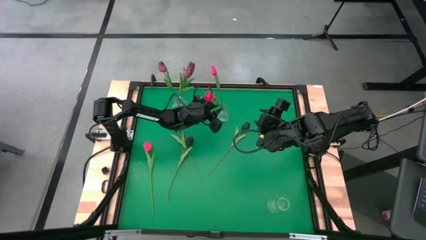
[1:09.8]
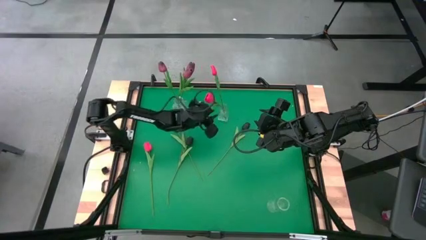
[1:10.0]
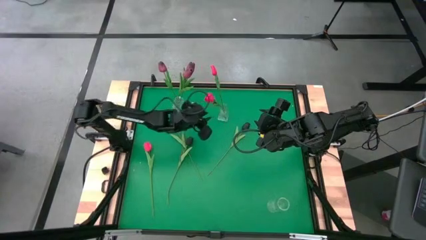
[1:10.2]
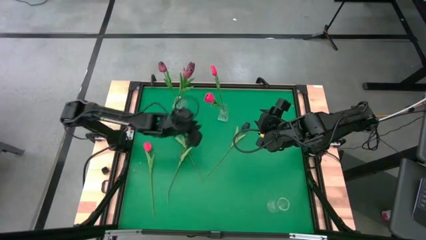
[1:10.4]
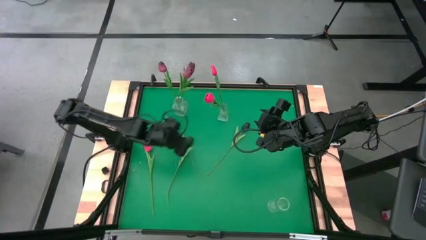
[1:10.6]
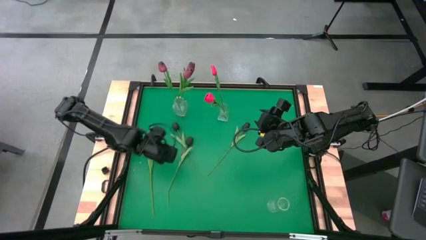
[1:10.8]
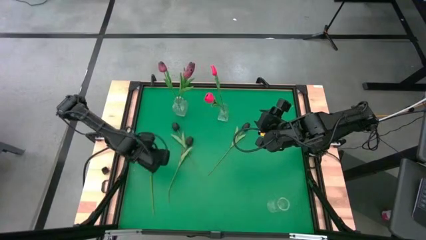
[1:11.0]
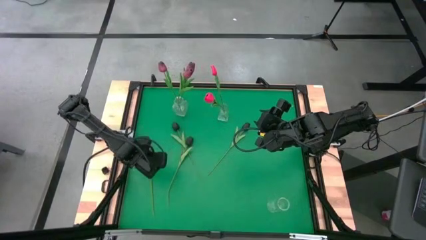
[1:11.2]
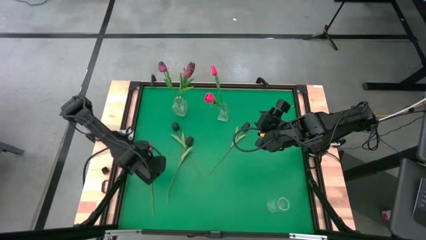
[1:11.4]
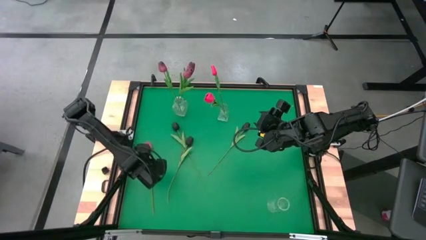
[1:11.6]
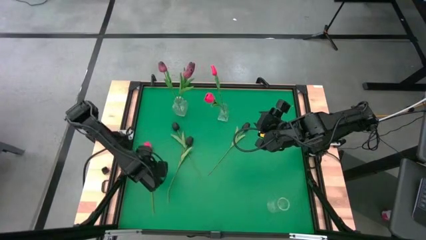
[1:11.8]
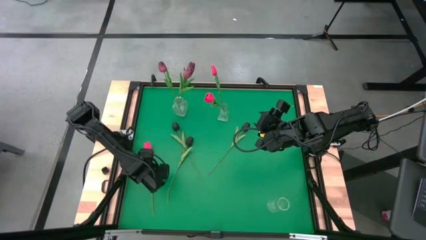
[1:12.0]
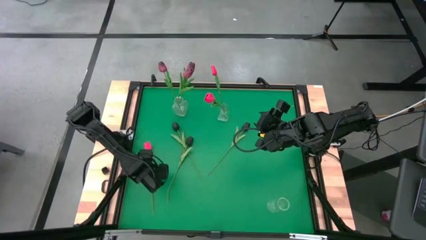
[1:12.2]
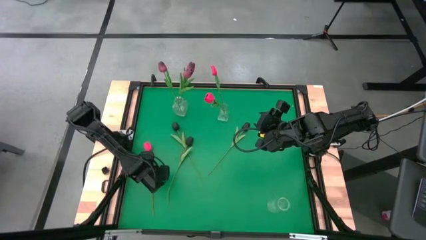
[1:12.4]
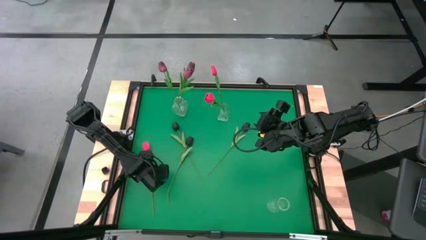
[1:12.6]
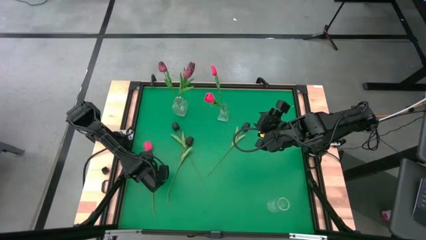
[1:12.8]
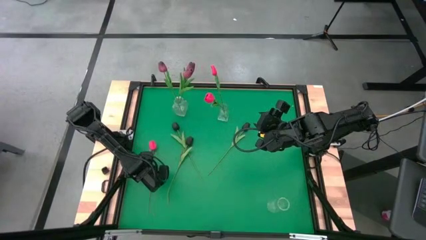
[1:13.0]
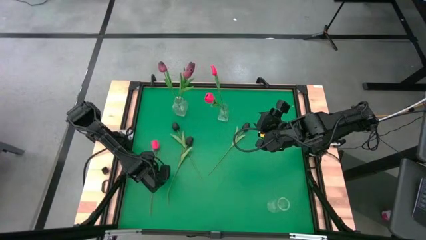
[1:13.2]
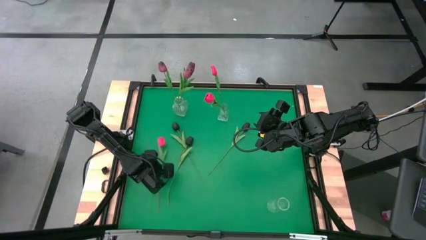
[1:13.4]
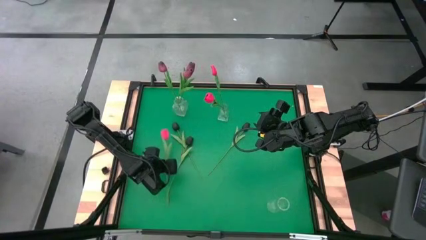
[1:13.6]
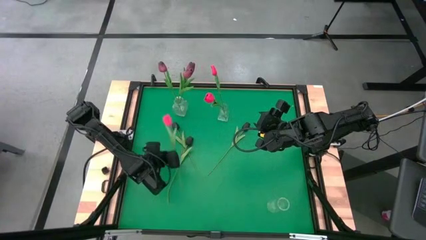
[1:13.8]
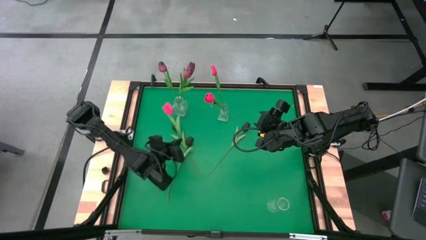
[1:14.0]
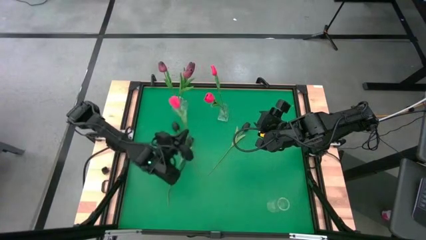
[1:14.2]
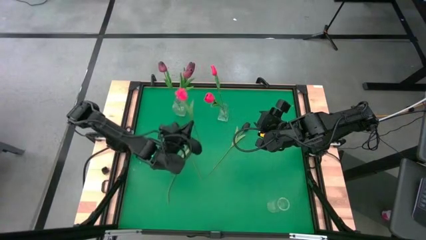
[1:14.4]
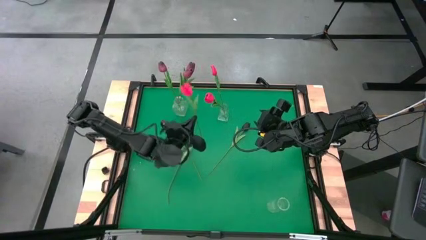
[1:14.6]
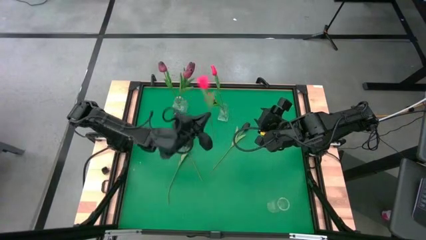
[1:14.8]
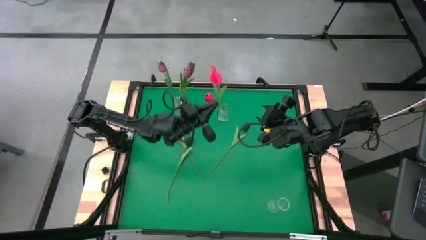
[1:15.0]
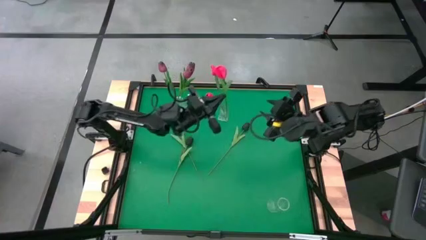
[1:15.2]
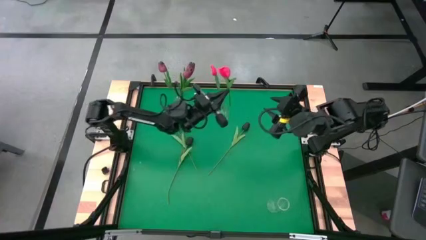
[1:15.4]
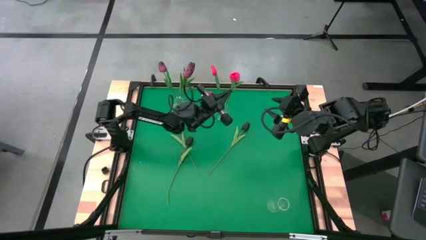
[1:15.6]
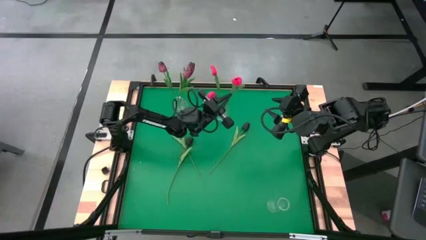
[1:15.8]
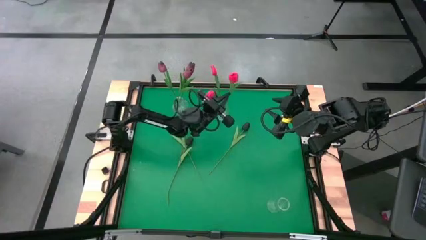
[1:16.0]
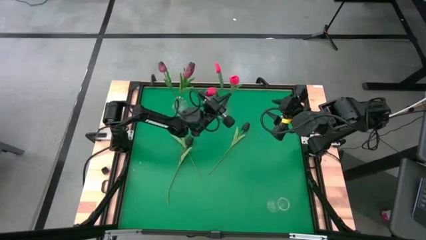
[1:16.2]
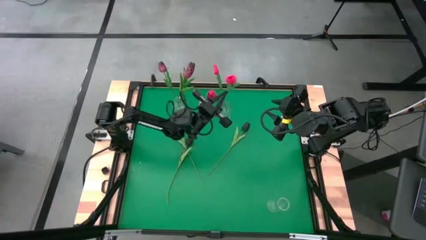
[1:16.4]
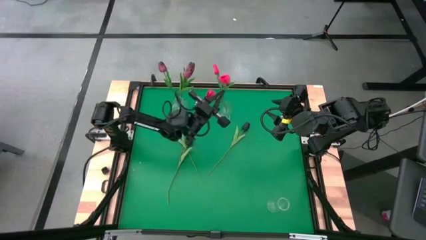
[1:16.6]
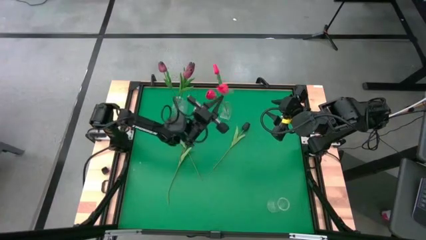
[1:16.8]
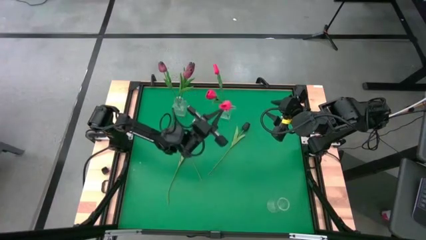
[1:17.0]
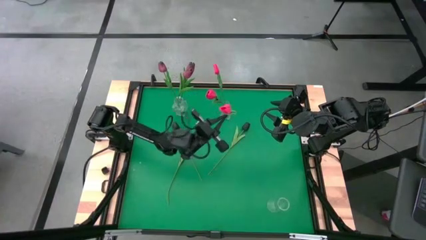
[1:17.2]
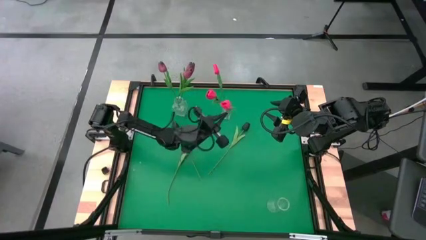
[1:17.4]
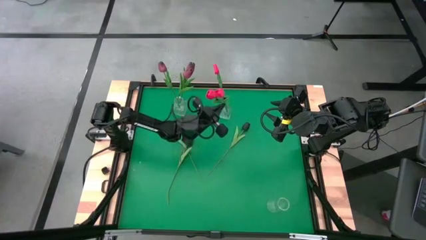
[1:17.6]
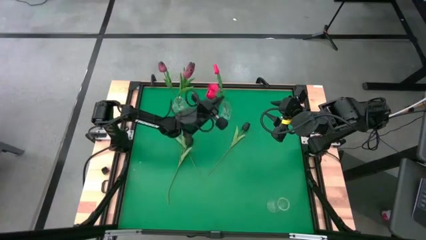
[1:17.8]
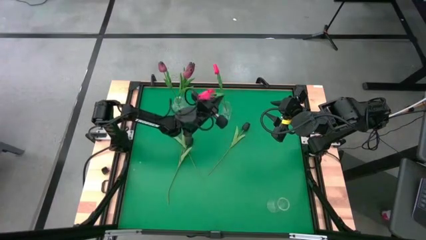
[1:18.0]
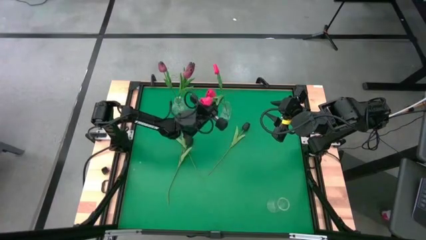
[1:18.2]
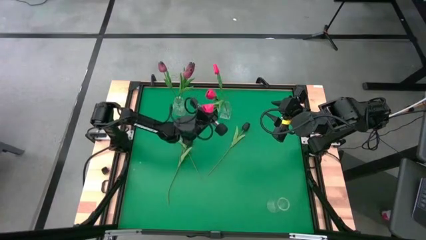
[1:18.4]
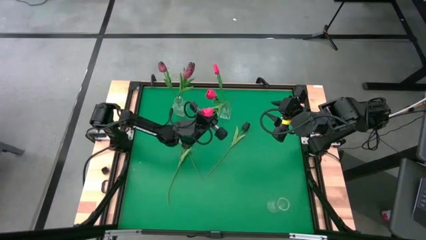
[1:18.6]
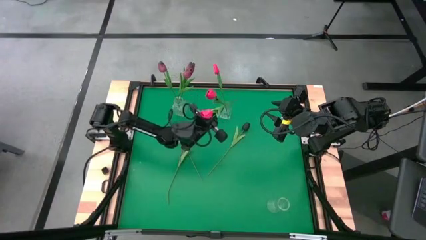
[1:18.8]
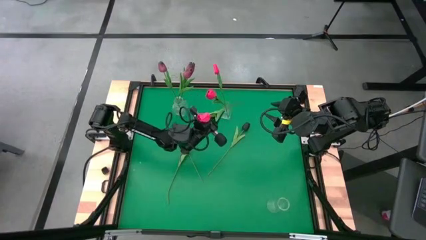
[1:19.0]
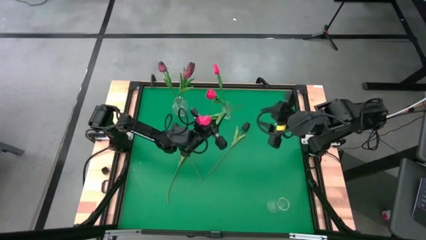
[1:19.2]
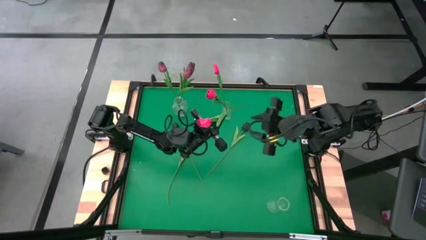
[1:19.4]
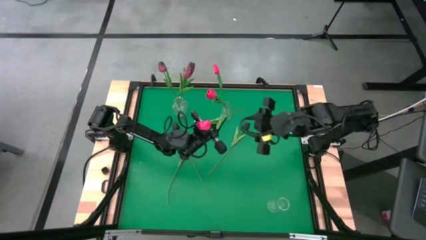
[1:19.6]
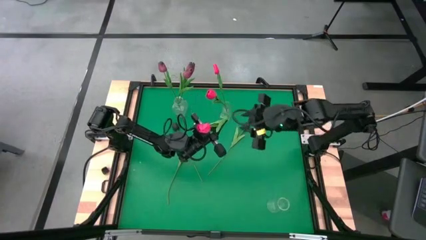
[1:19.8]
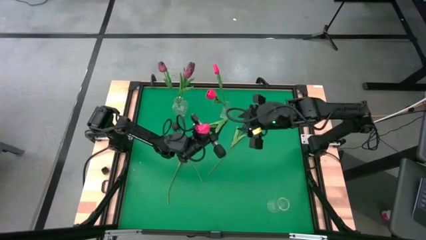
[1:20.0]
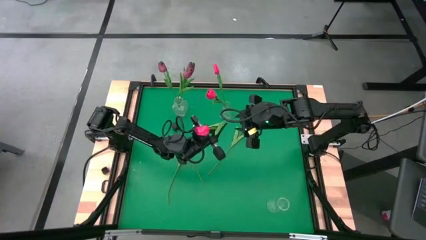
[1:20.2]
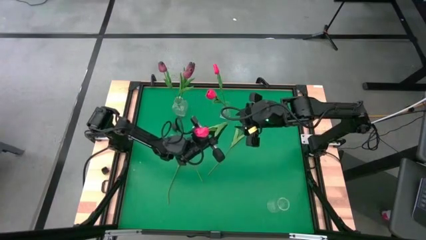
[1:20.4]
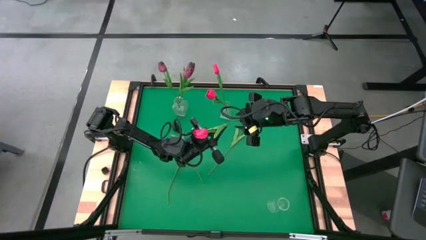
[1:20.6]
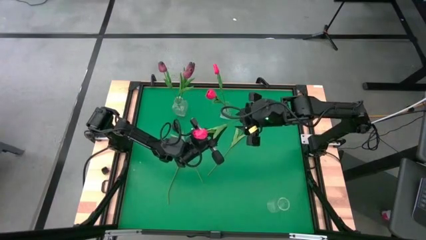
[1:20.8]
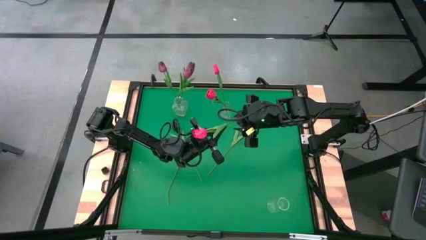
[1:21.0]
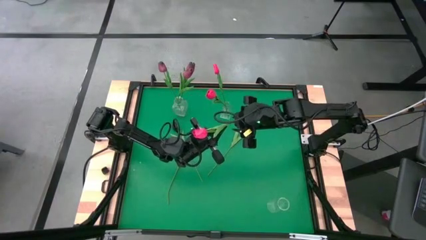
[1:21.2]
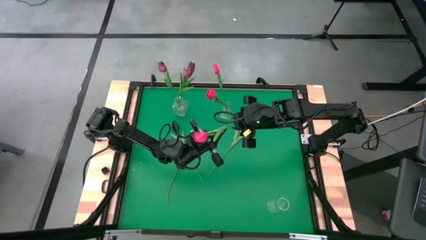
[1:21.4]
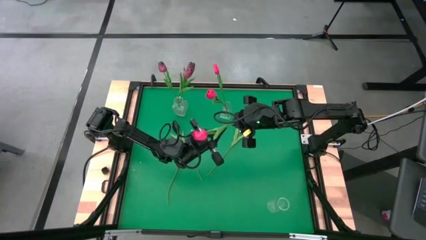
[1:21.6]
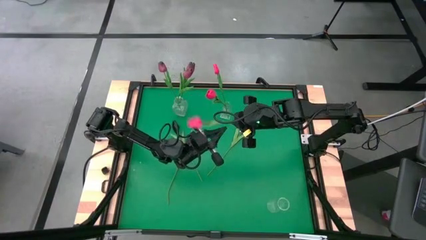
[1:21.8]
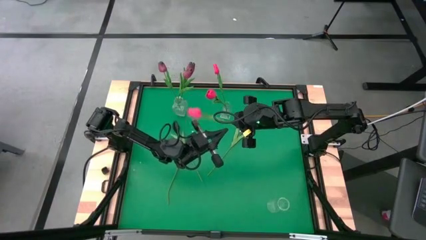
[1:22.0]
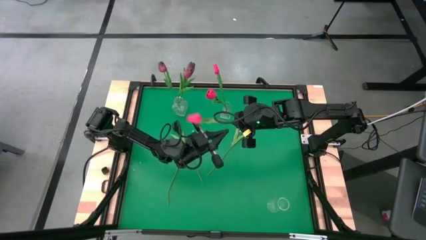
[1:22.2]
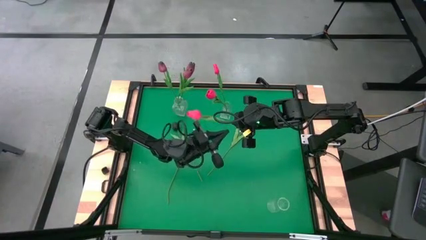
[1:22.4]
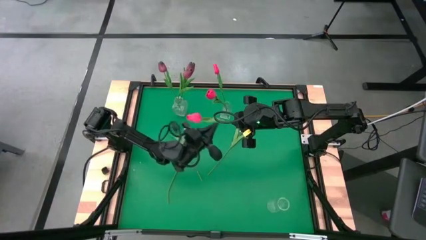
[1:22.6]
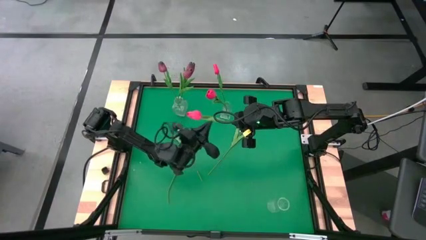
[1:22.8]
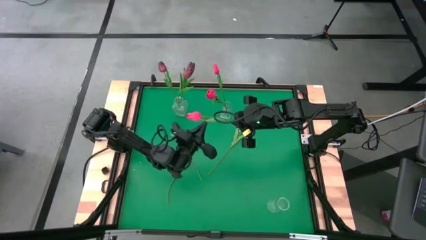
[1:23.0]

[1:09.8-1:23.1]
Task: Sort flowers into vase by color
Put the red tulip into the top right transparent vase

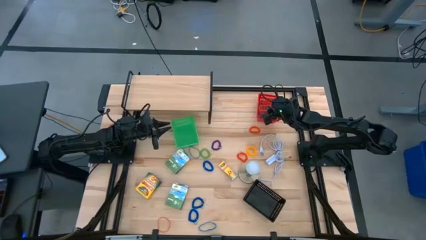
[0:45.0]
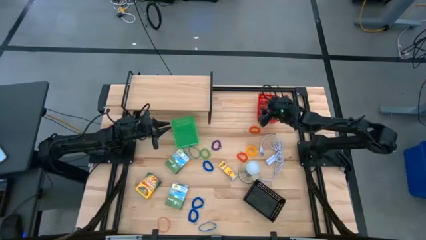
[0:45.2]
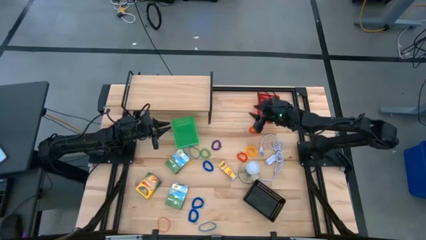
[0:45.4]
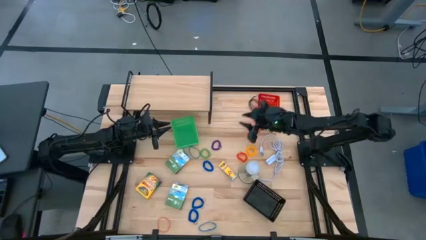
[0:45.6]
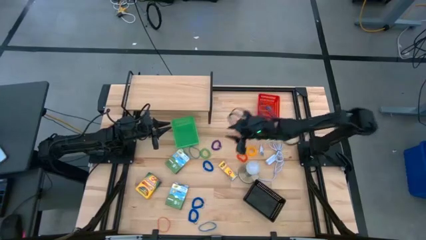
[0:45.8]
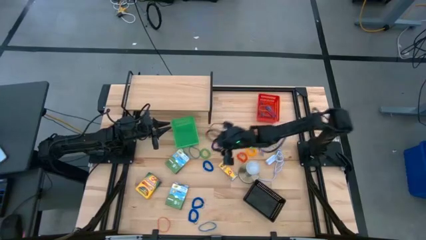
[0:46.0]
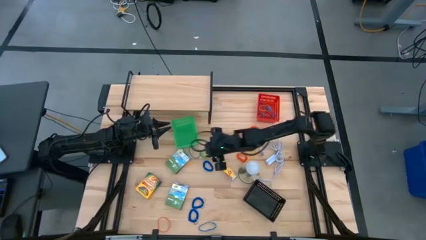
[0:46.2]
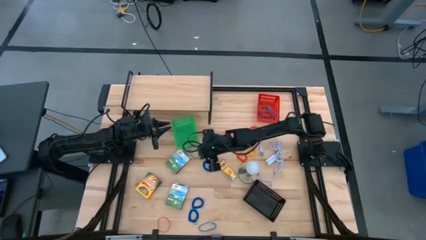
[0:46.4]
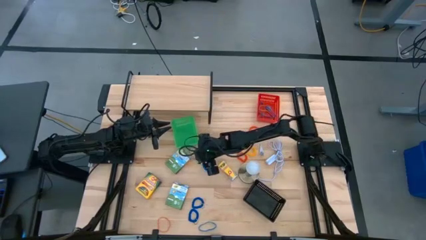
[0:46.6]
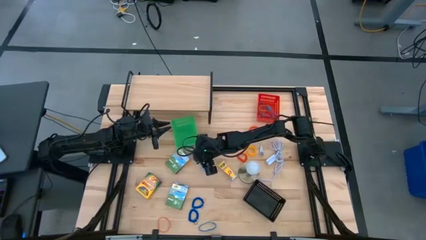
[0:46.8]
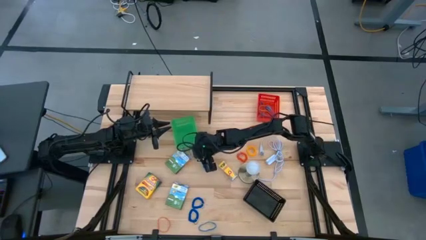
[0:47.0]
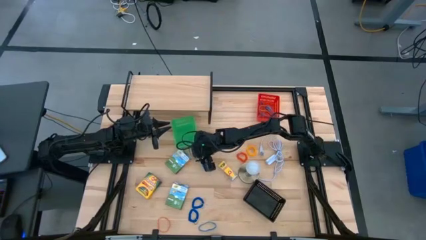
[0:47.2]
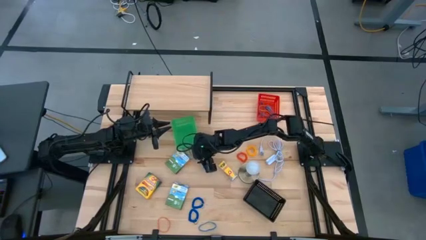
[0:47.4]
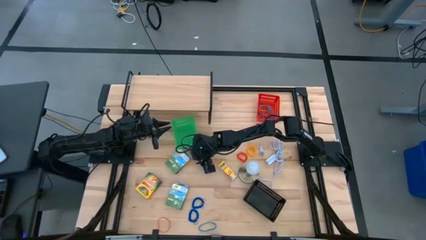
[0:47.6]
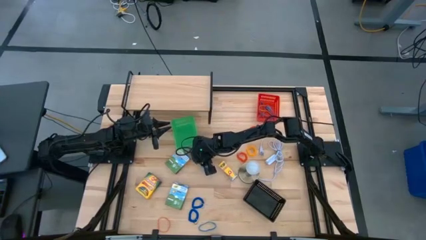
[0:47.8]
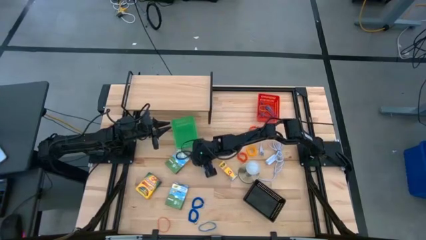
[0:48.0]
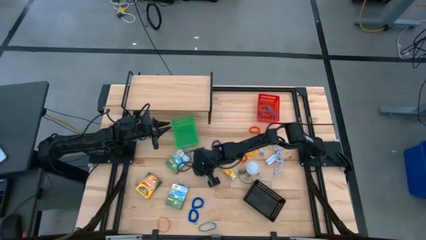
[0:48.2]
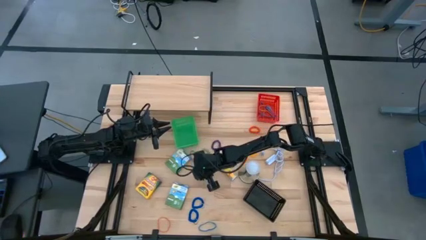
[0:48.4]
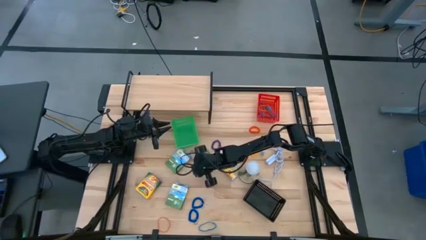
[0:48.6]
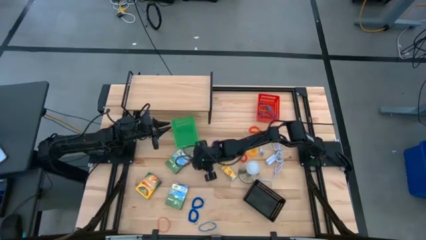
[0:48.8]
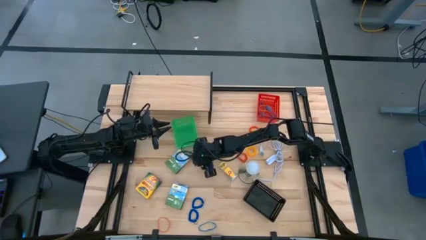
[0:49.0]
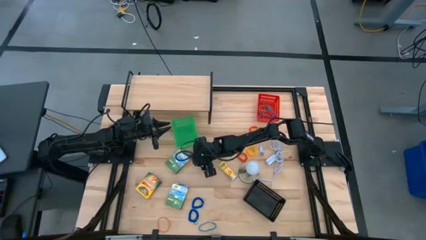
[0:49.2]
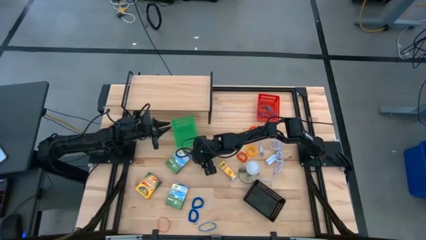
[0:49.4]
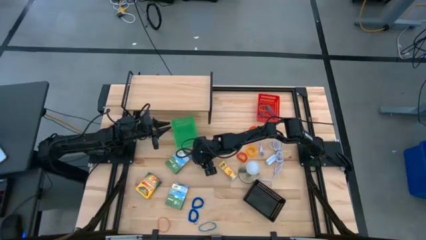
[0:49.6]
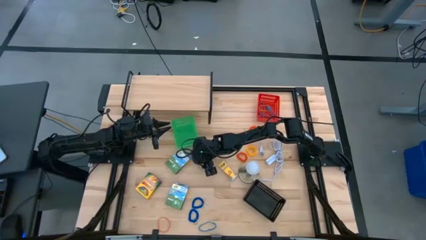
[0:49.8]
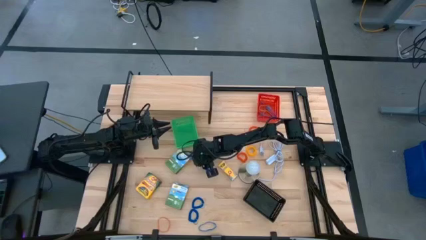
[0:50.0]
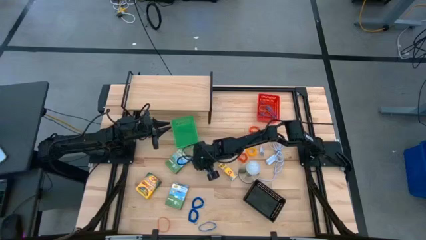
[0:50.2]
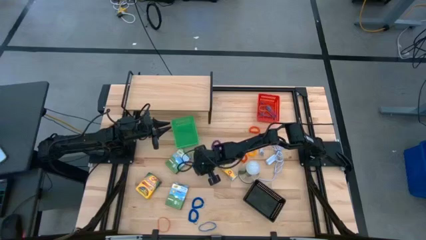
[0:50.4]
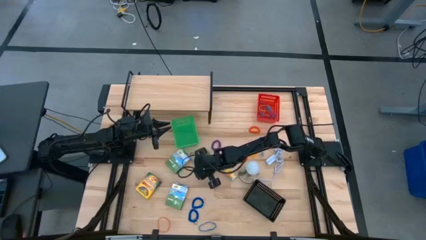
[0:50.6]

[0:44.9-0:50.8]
Task: Pick & Place Office Desk Supplies
Put the blue rubber band into the red basket
